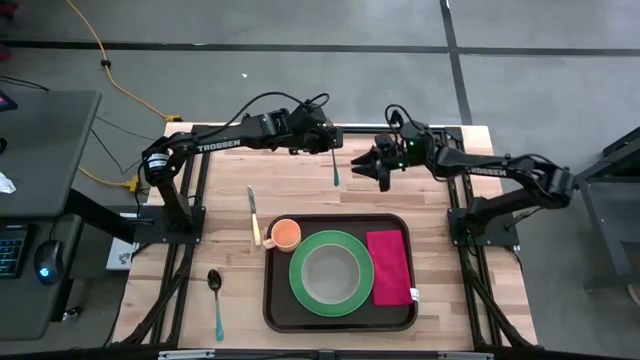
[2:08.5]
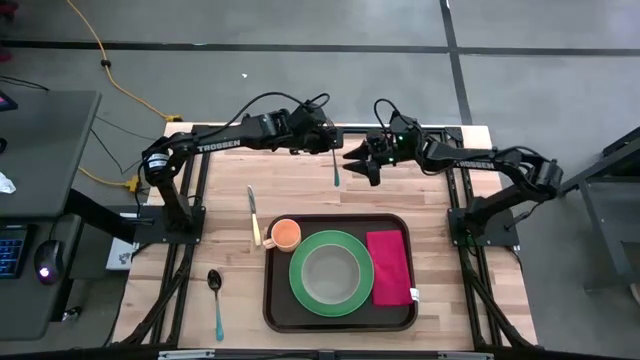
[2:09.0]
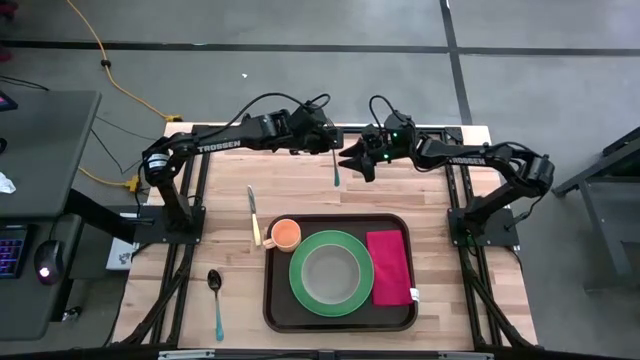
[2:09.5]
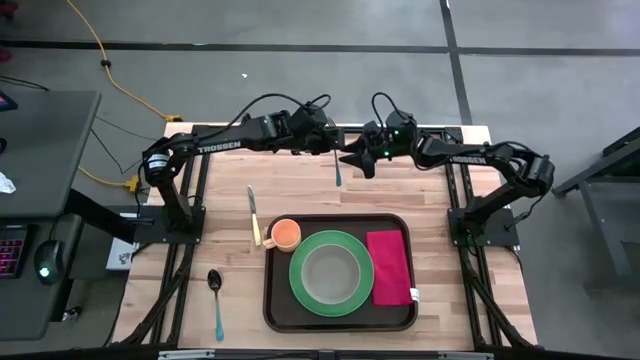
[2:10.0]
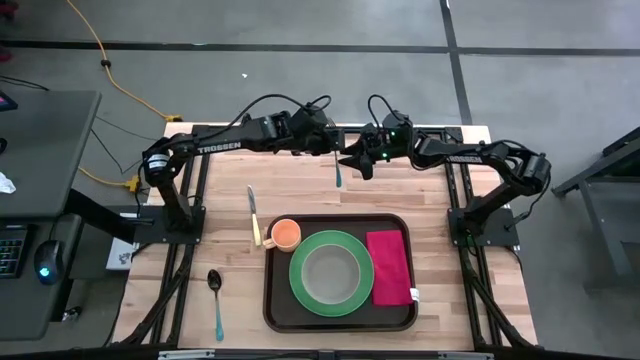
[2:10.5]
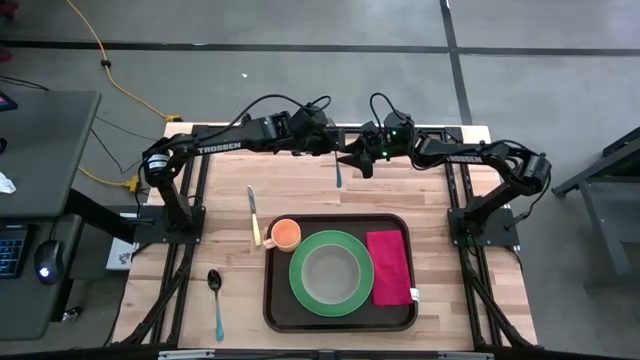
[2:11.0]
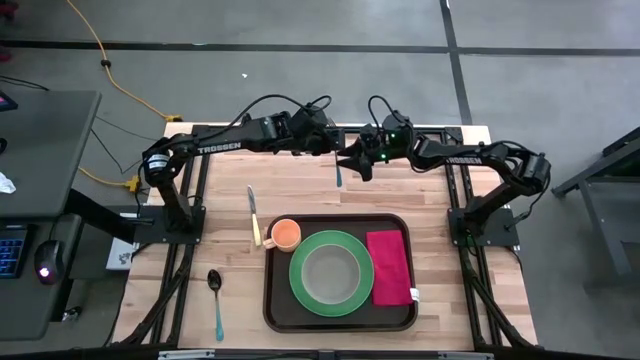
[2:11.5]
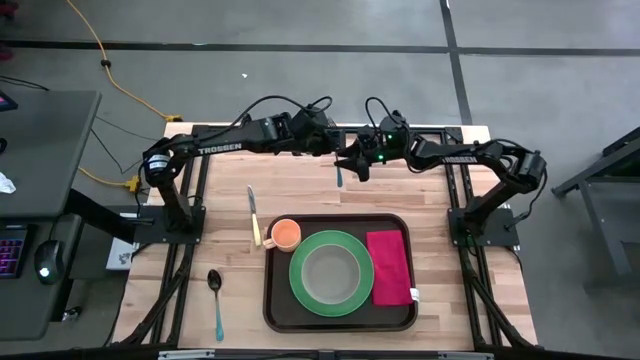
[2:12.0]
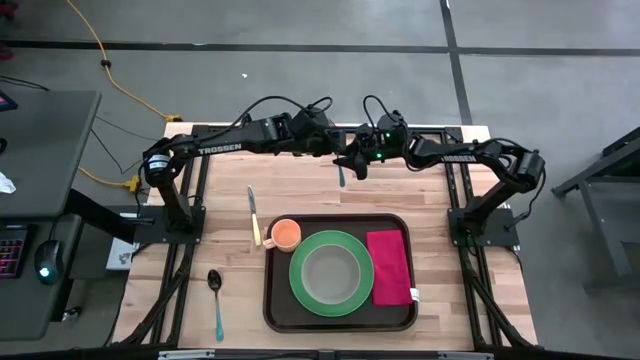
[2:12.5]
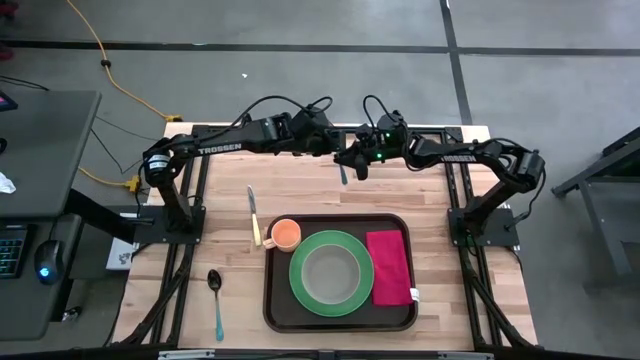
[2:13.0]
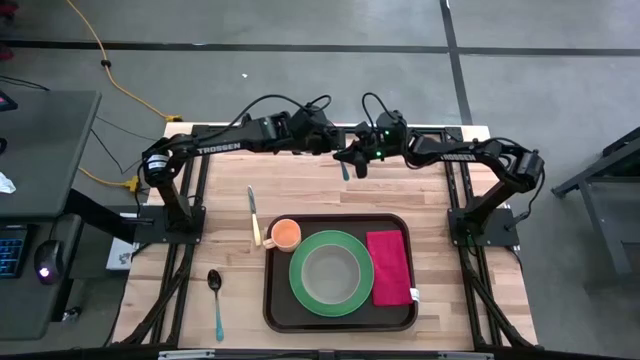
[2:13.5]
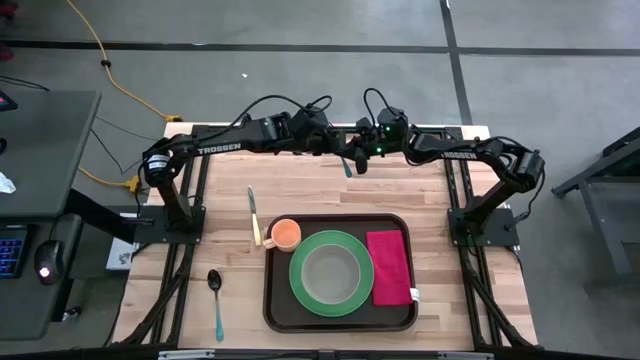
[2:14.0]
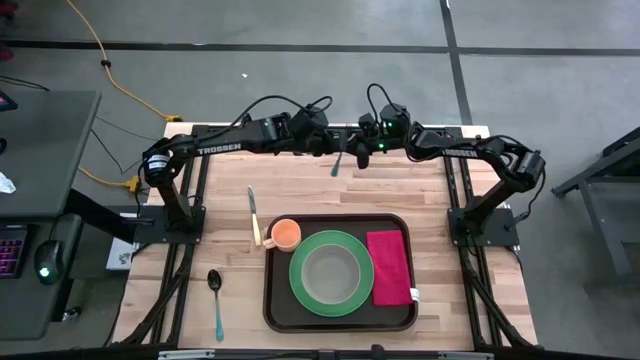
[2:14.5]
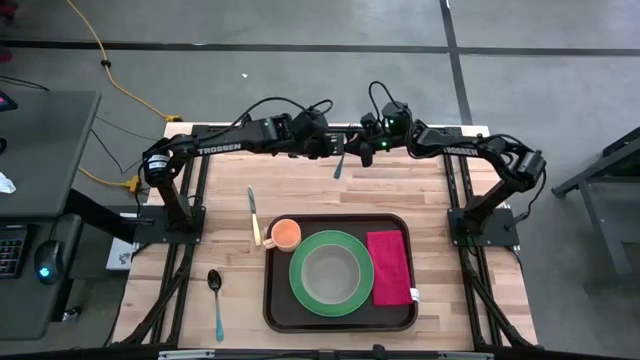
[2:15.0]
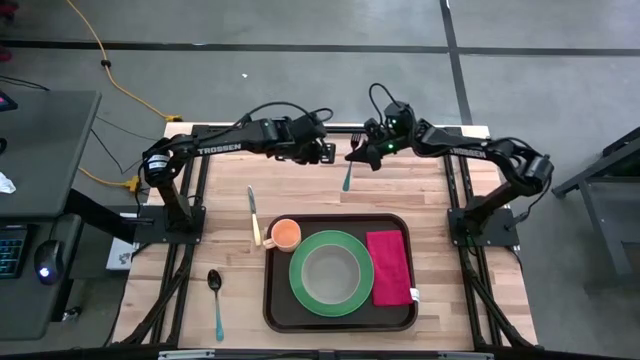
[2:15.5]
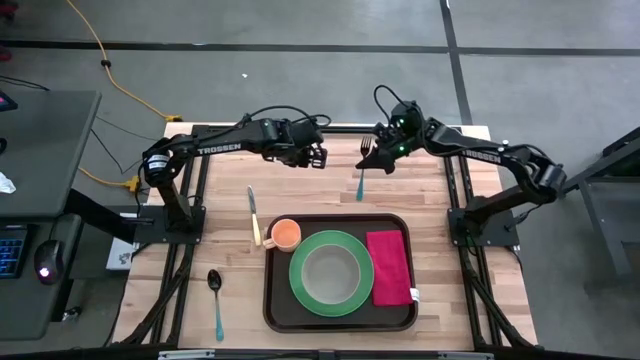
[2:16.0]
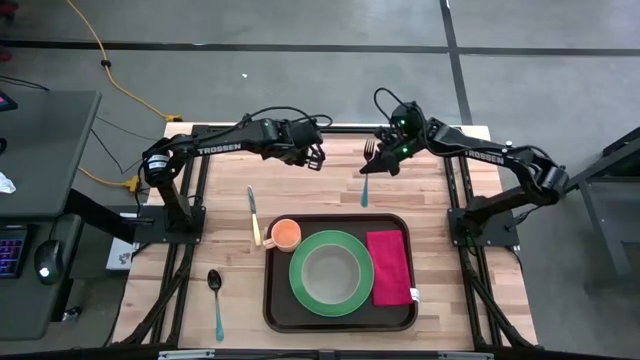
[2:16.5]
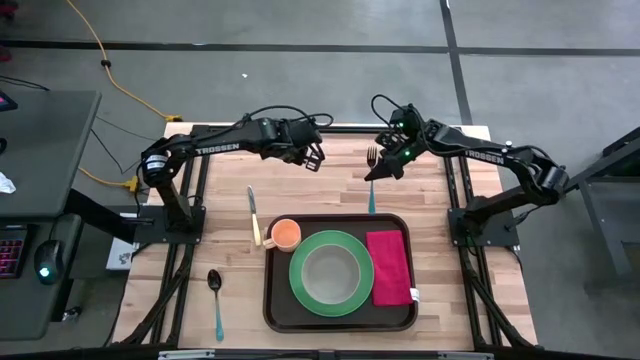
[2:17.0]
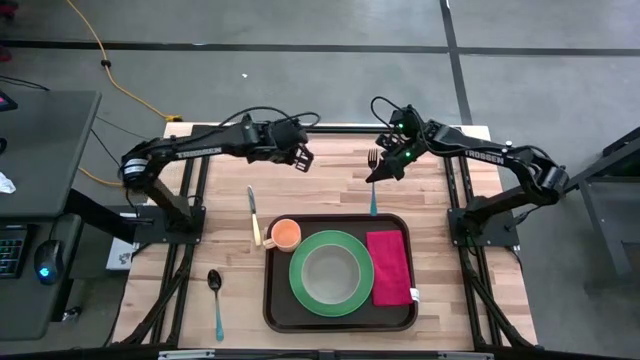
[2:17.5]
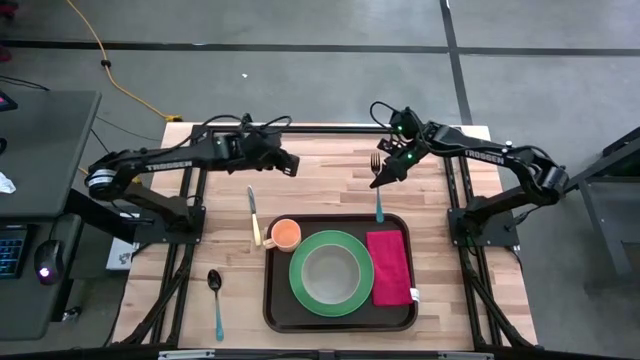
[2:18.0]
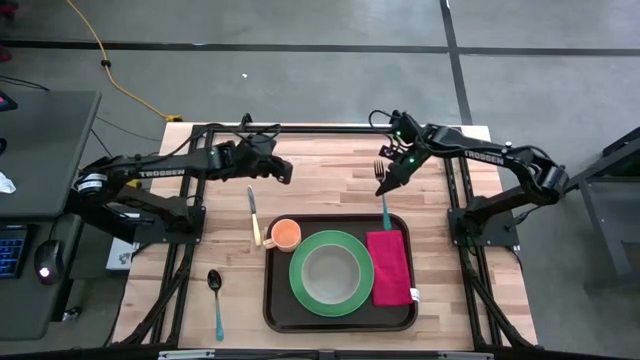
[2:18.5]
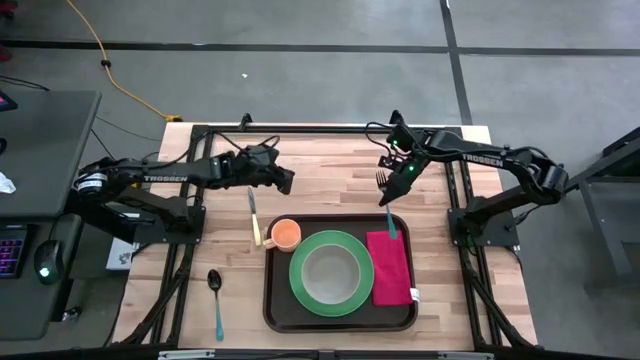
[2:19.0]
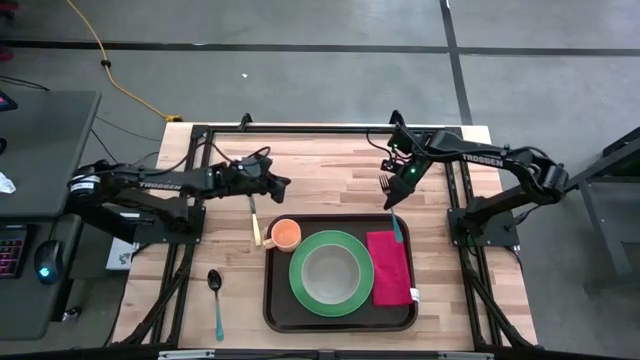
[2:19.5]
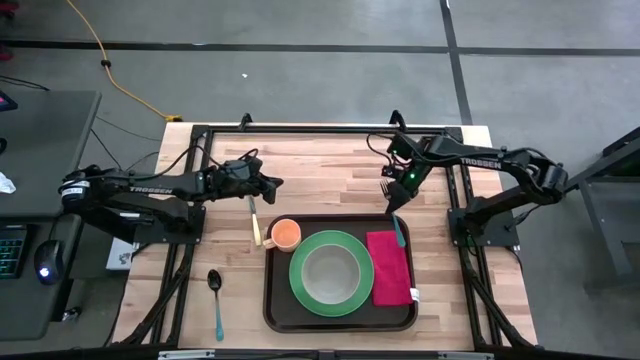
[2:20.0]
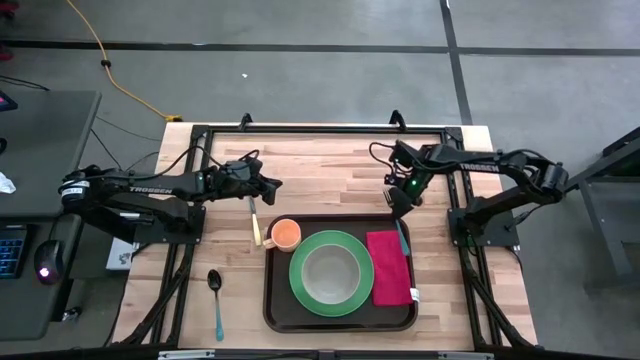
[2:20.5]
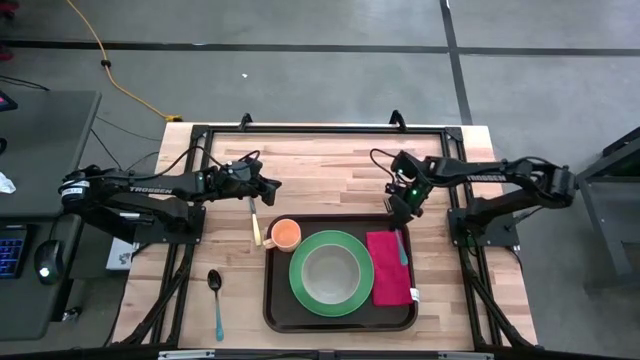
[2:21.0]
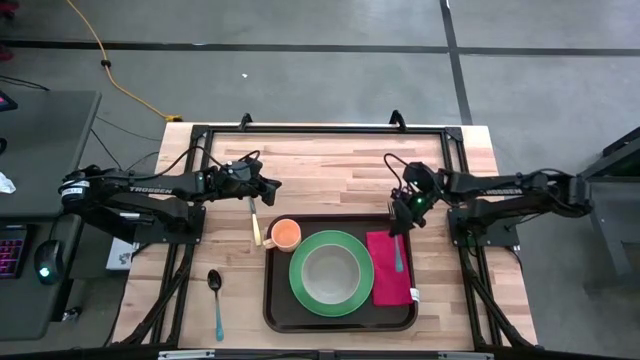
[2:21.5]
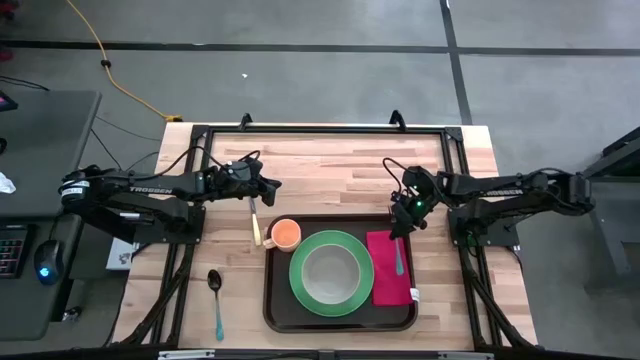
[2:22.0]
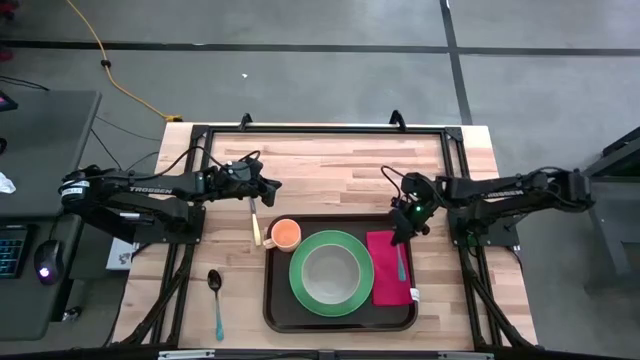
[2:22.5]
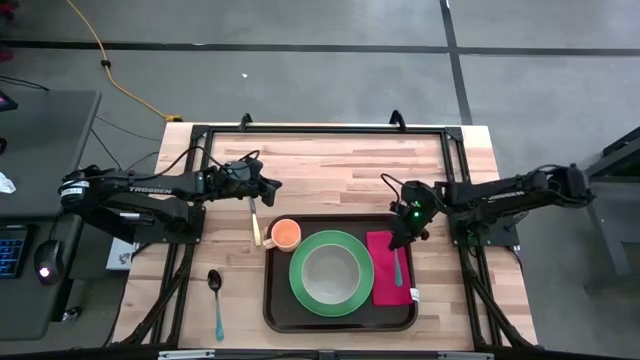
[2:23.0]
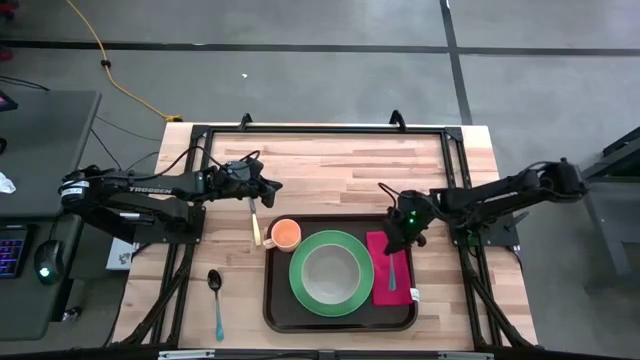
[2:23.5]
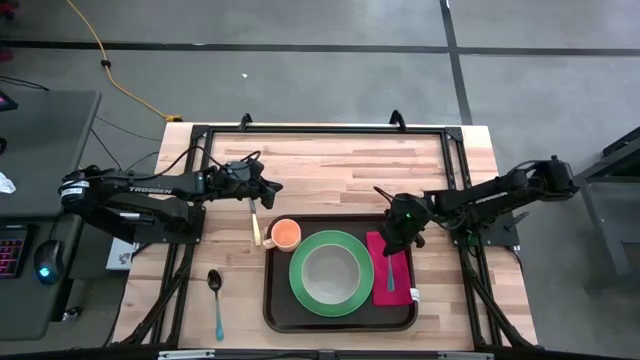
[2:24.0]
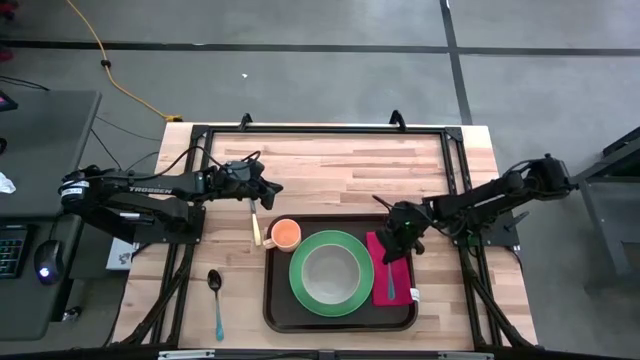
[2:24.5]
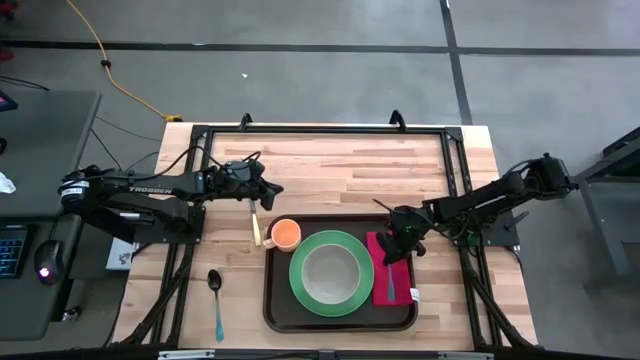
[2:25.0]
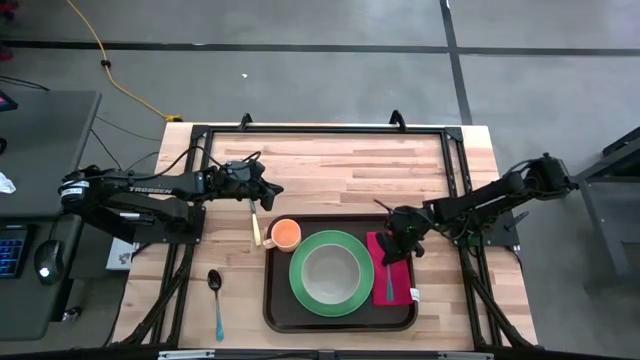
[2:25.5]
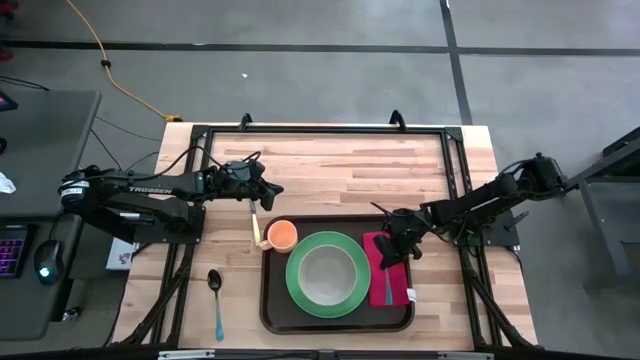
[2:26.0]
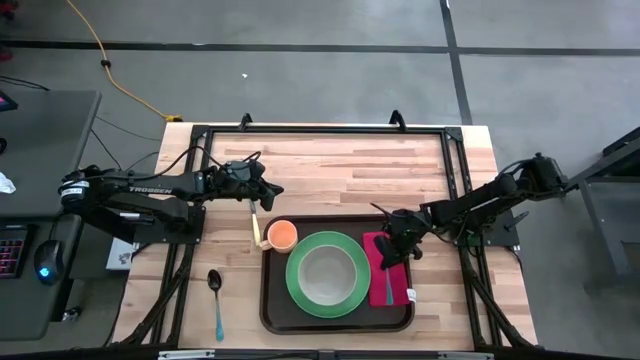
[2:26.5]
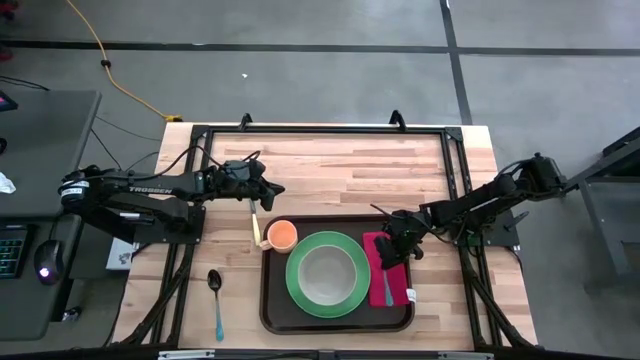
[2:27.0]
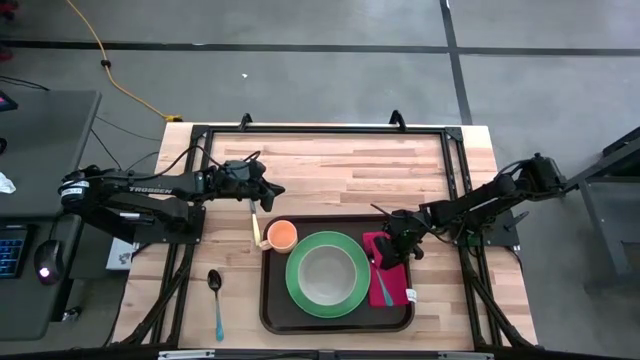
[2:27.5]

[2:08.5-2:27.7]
Task: Set up tray
Put the blue fork on top of the red napkin on the black tray

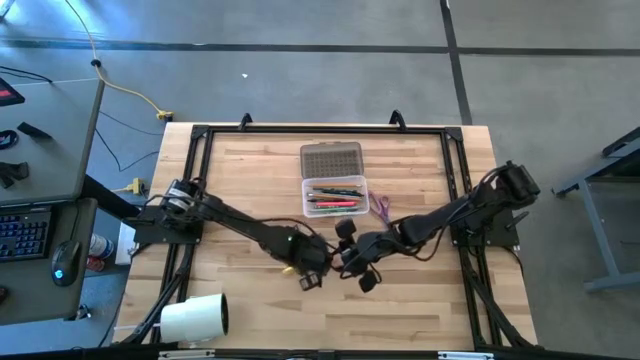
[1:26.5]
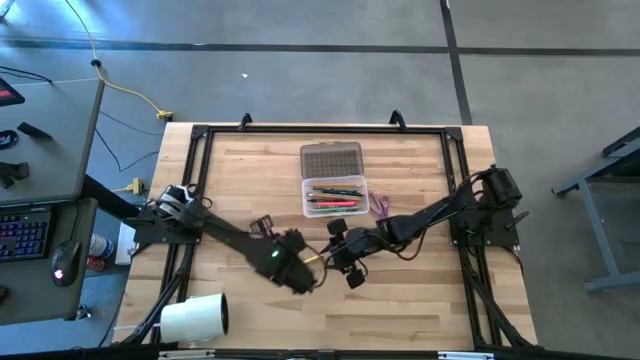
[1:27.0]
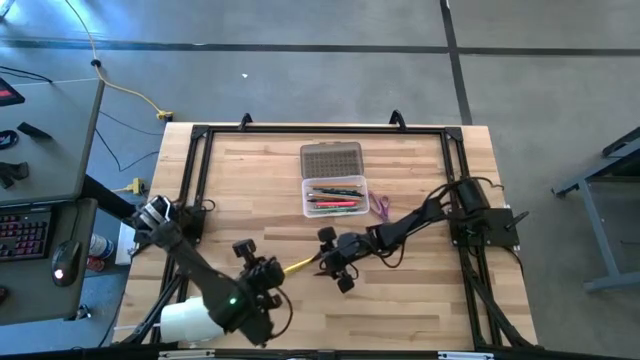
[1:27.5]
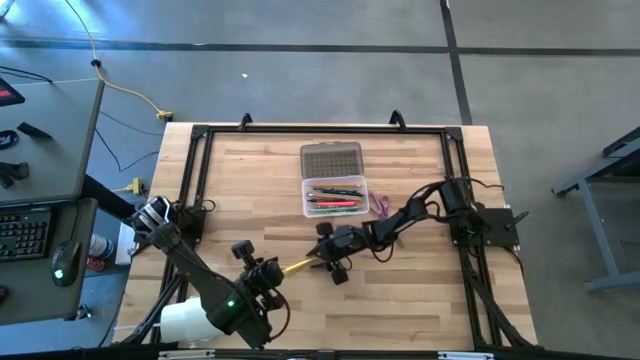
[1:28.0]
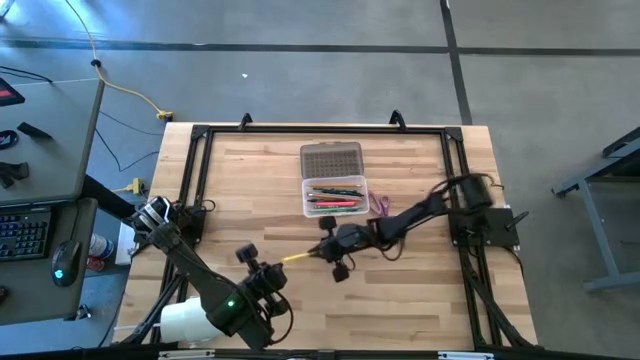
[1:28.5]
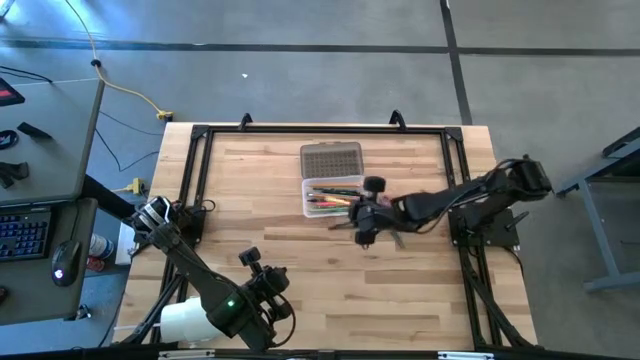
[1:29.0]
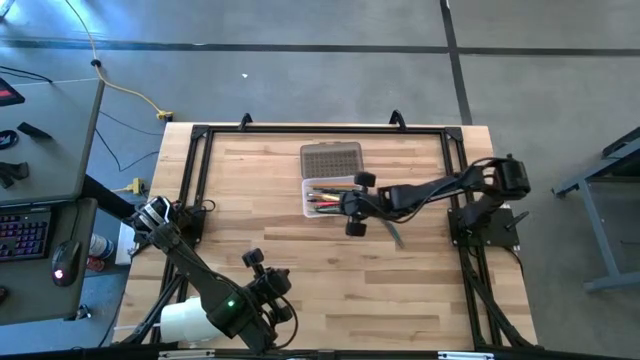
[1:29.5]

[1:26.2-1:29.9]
Task: Pick & place school supplies into a supply box
Put the yellow pen into the black supply box
